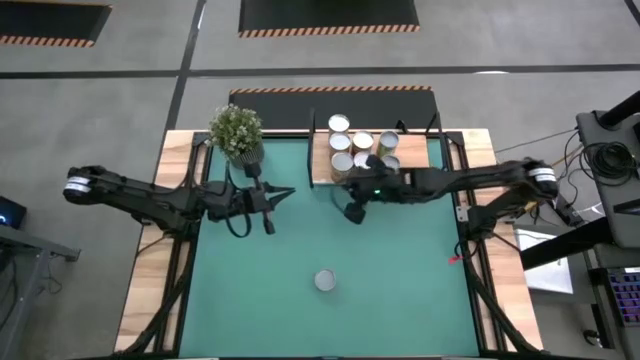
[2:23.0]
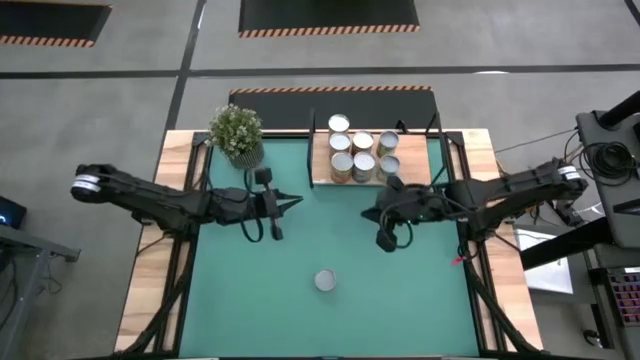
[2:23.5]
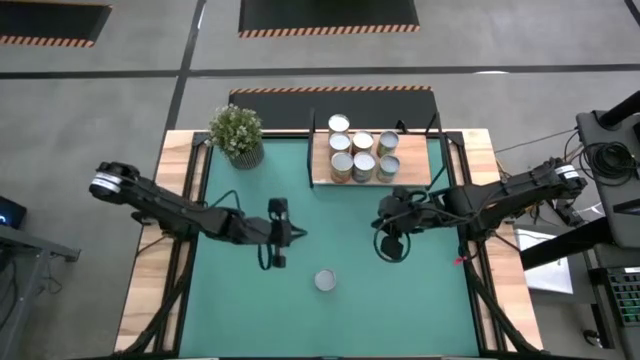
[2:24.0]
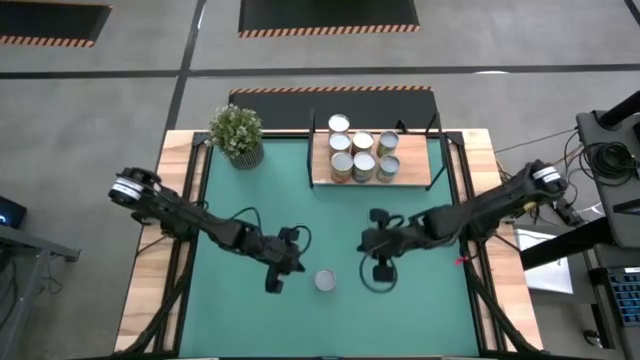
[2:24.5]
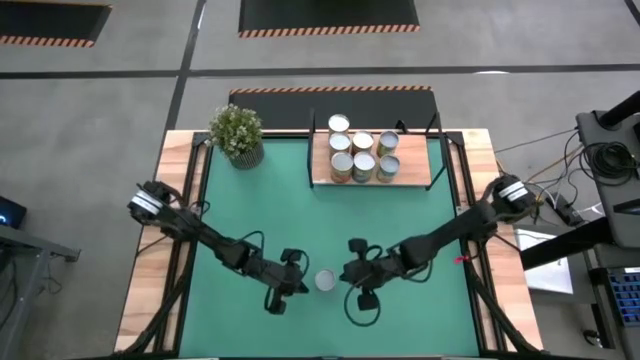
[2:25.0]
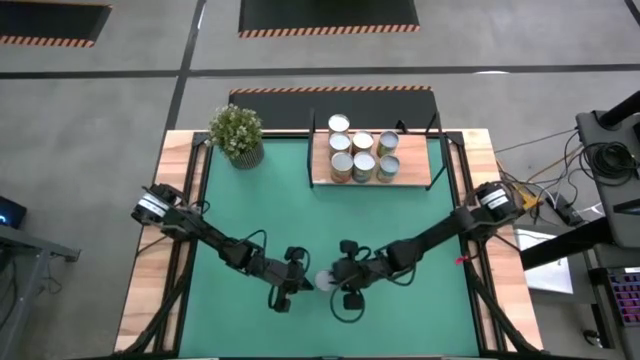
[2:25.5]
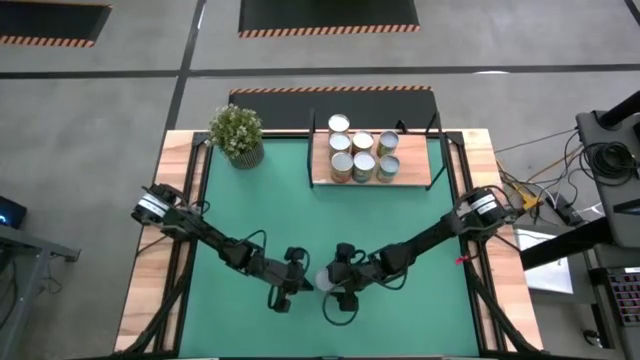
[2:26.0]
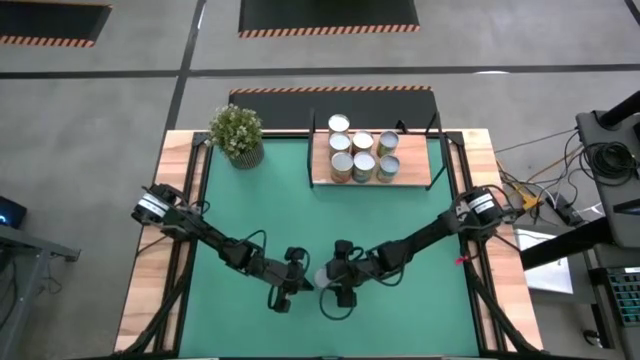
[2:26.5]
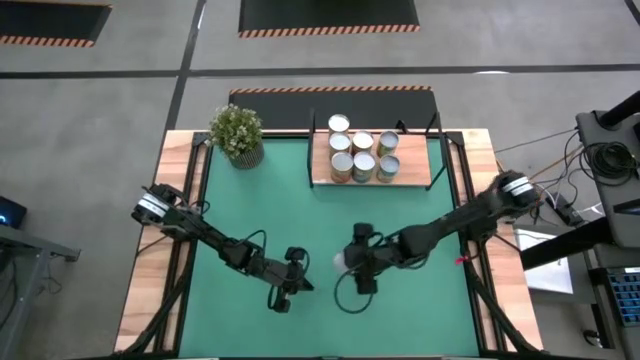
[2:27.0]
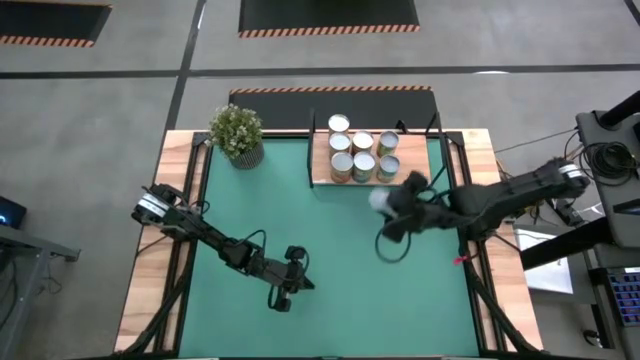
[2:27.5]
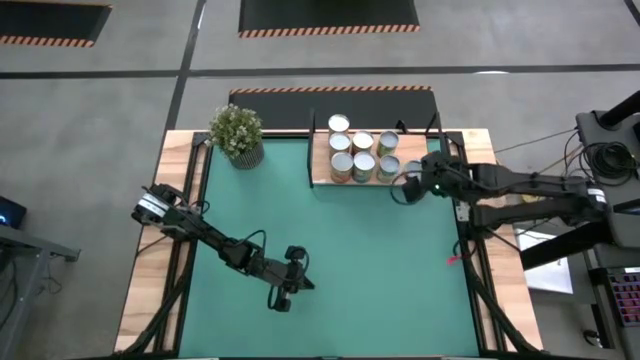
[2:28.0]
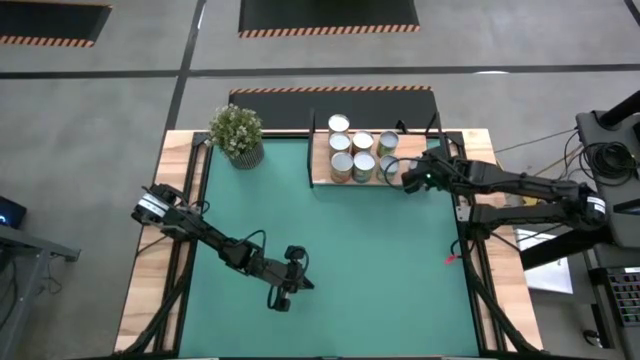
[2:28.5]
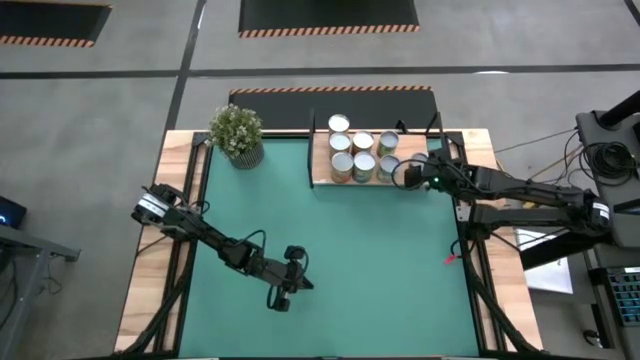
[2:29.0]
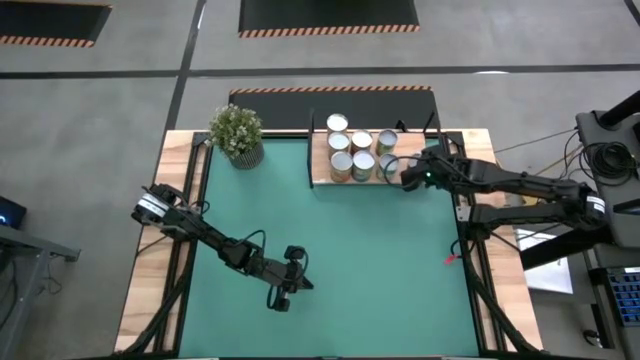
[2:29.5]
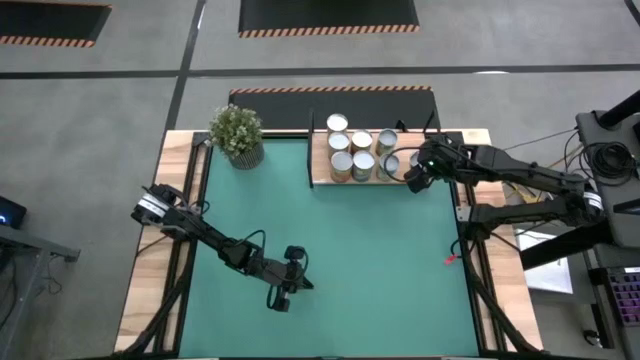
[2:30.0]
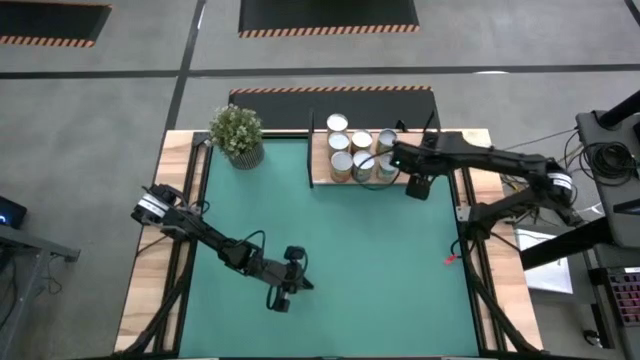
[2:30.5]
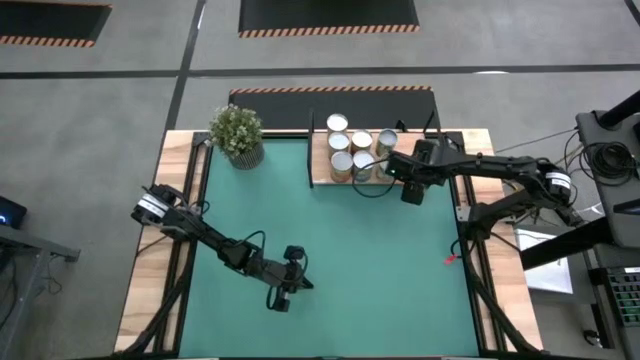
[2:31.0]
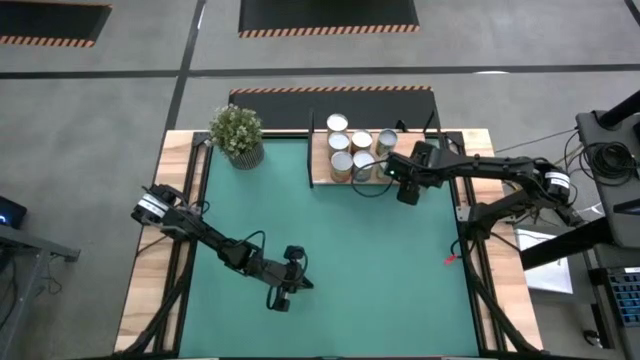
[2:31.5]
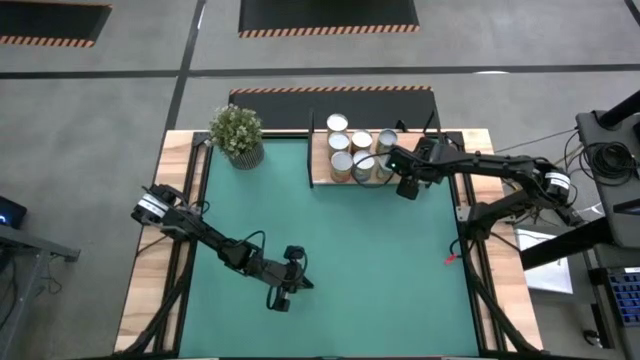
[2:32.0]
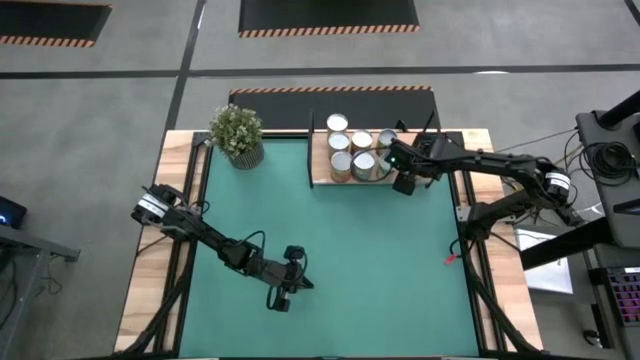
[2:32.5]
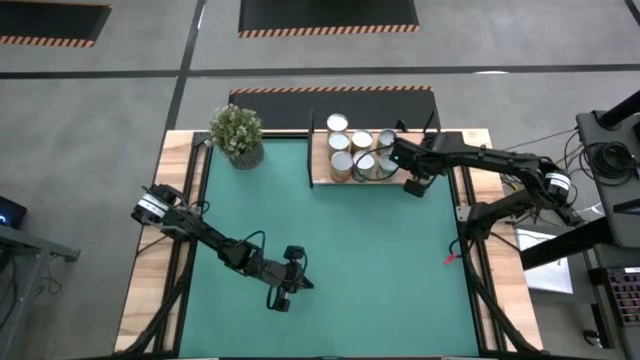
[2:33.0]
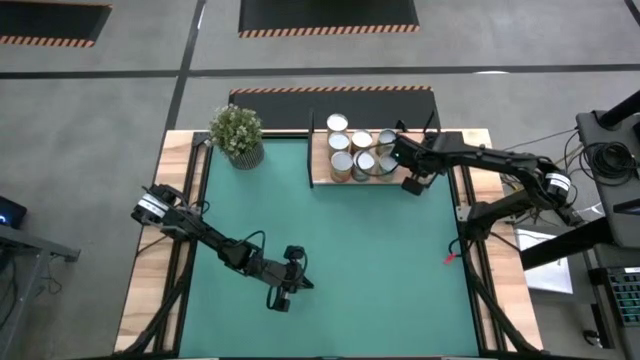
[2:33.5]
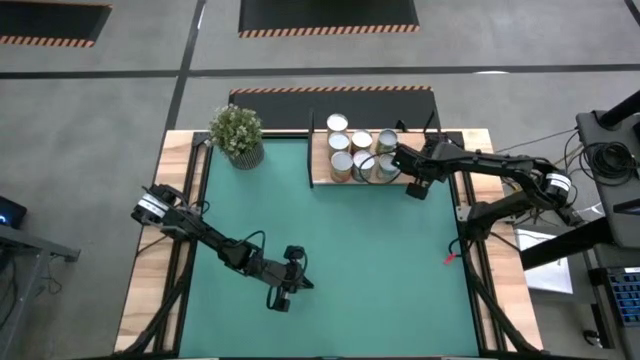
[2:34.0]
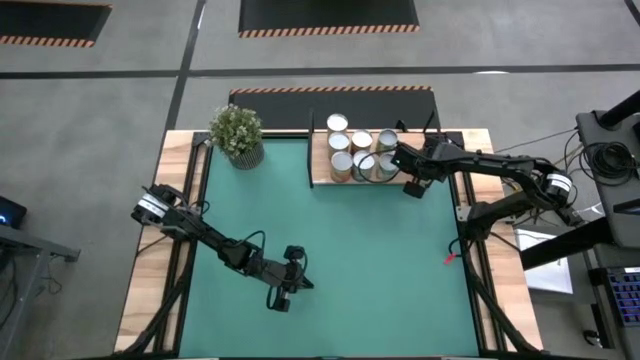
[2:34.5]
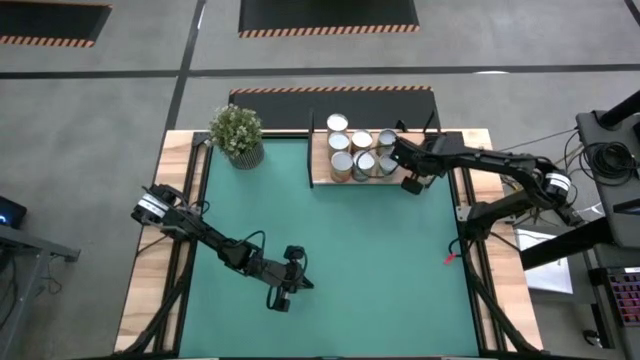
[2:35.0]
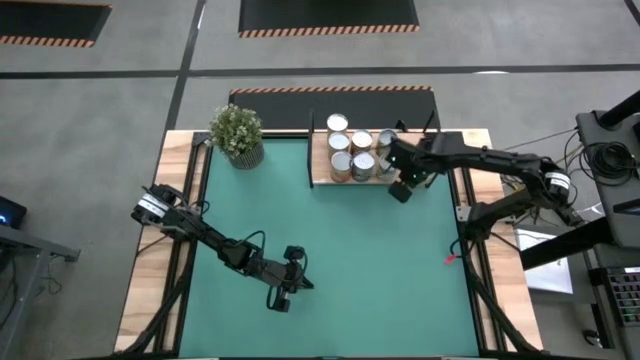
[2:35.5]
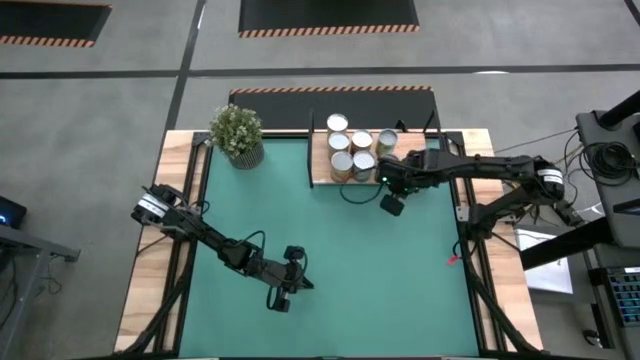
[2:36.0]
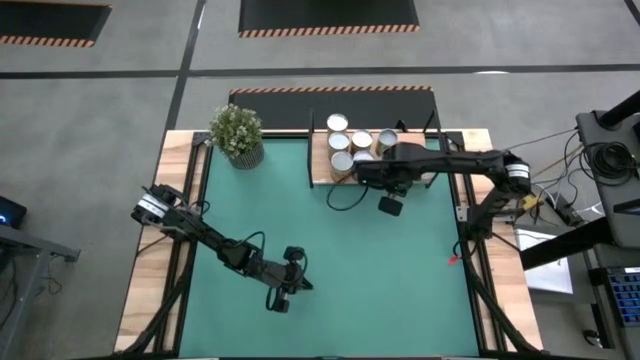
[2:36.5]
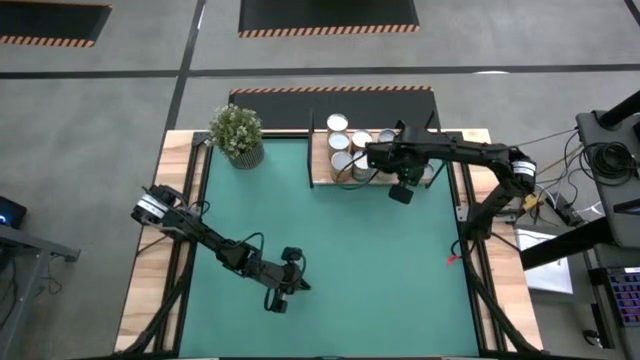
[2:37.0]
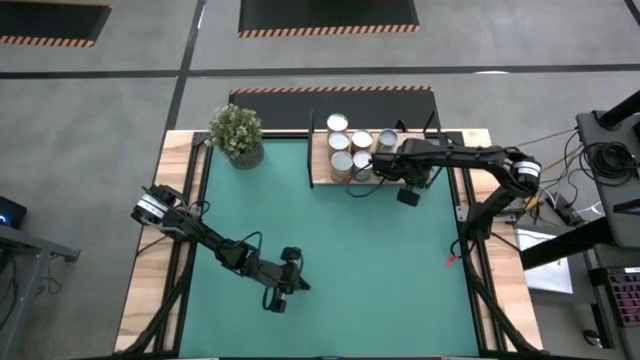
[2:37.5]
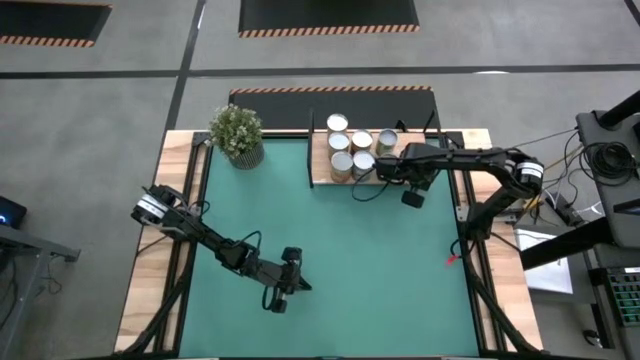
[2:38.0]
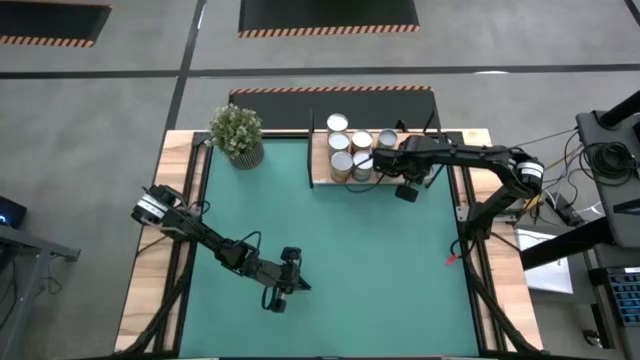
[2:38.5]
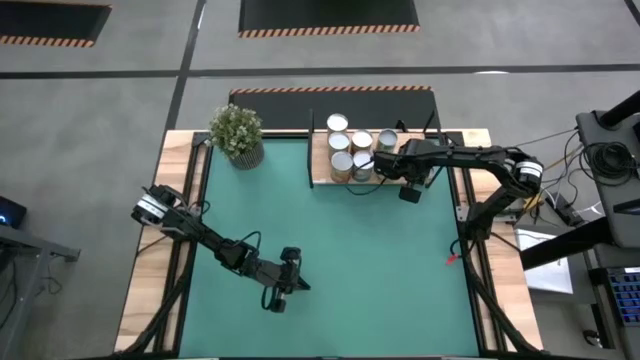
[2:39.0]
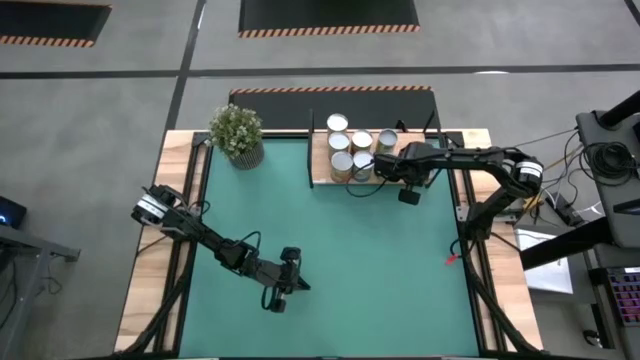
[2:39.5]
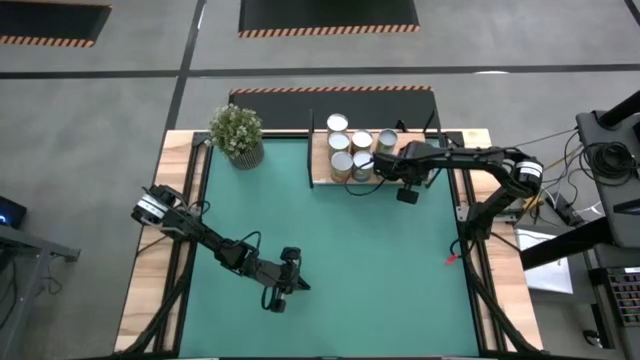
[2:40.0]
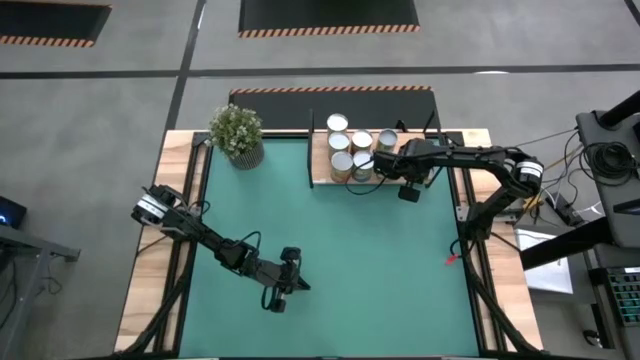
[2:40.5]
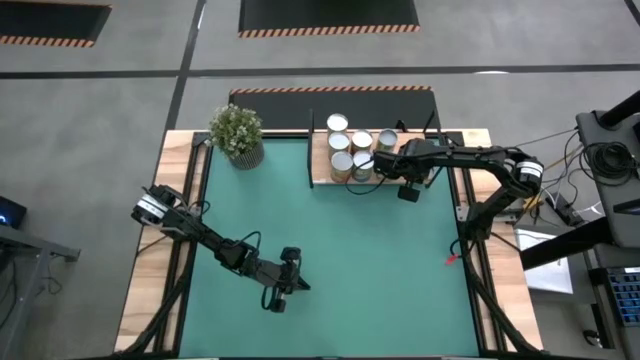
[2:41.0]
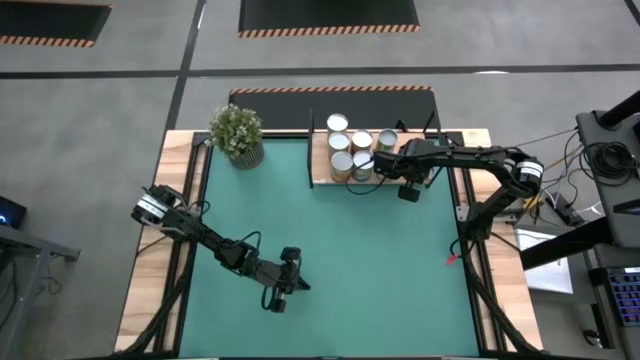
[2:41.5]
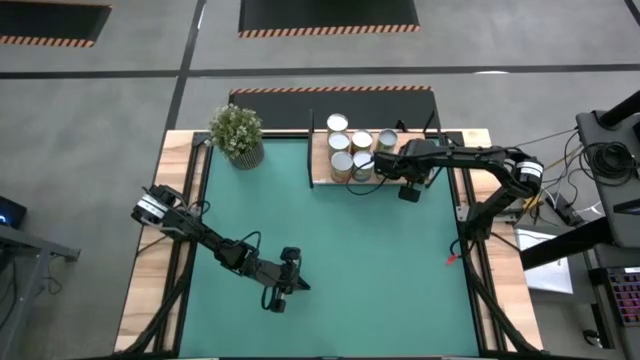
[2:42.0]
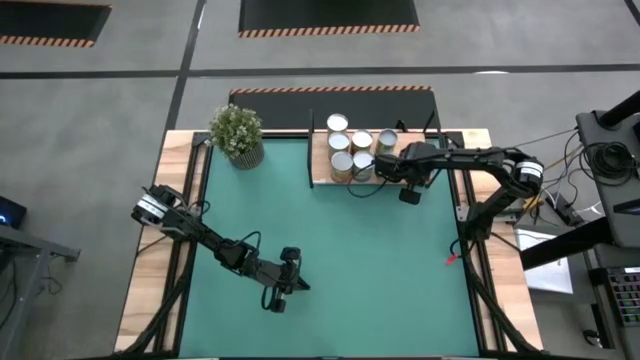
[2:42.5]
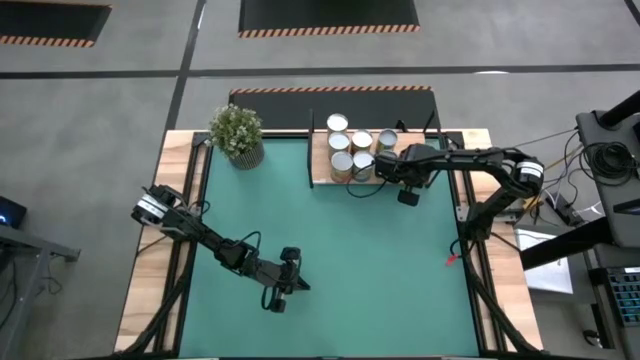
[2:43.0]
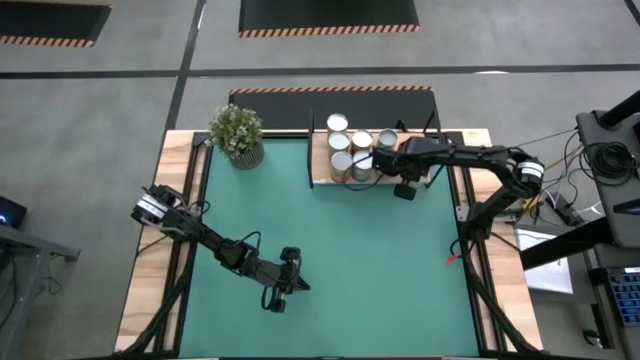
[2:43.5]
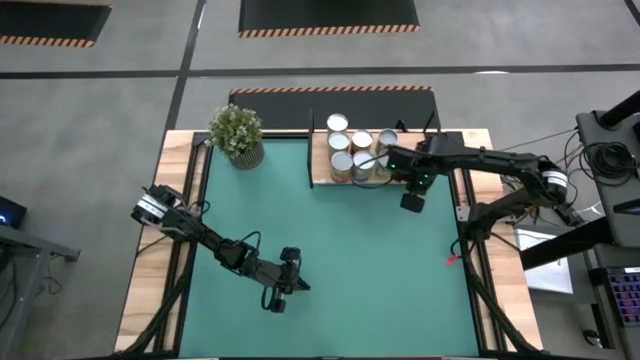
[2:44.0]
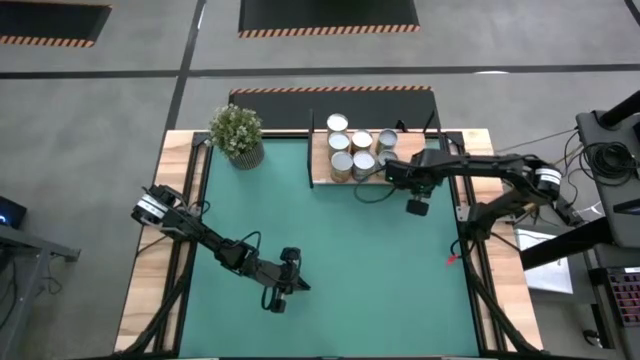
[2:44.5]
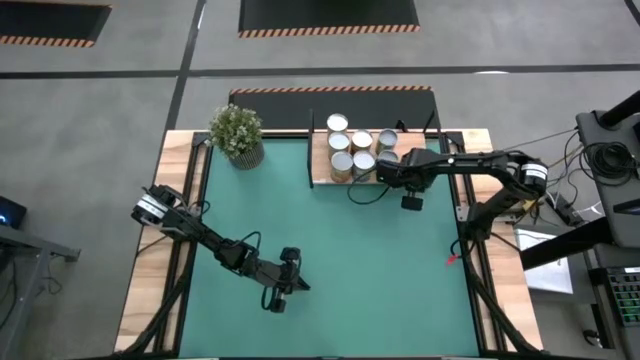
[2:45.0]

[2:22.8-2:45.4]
Task: Pick and place cans onto a shelf
Put the orange can on the shelf
